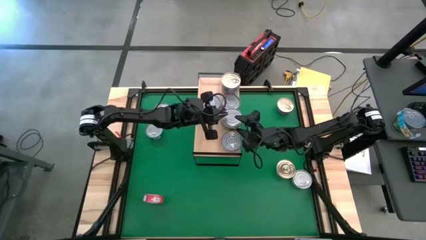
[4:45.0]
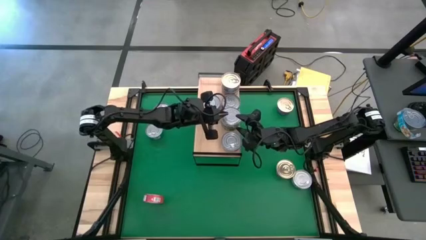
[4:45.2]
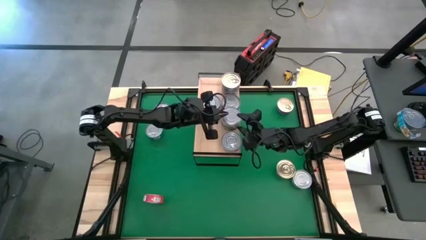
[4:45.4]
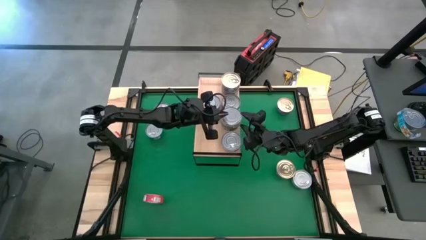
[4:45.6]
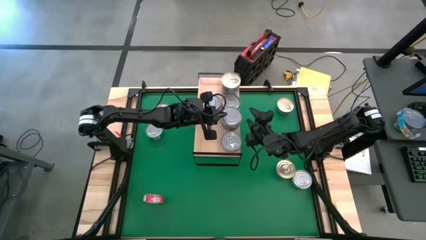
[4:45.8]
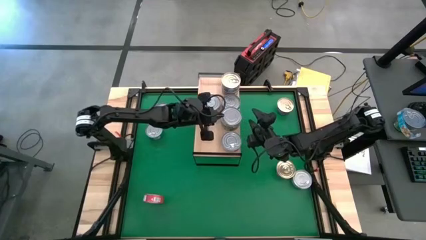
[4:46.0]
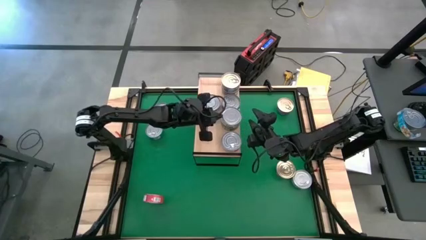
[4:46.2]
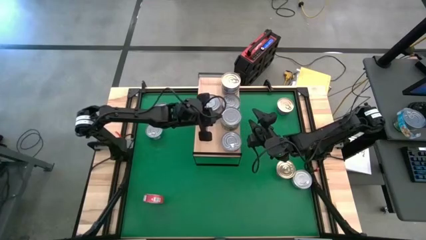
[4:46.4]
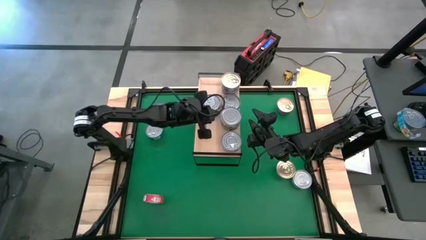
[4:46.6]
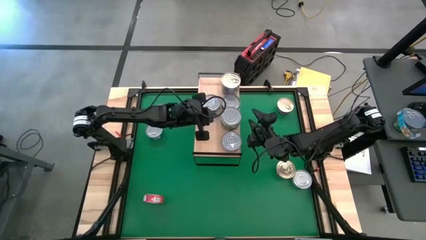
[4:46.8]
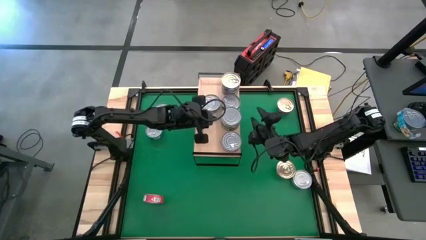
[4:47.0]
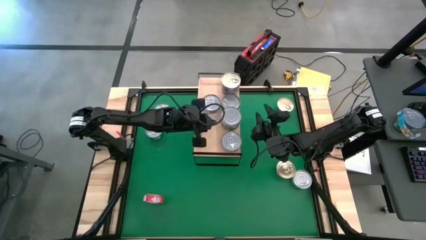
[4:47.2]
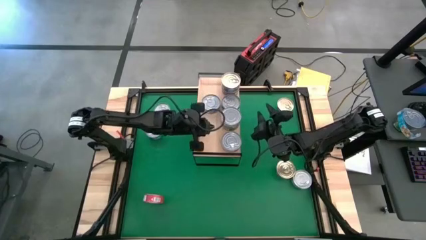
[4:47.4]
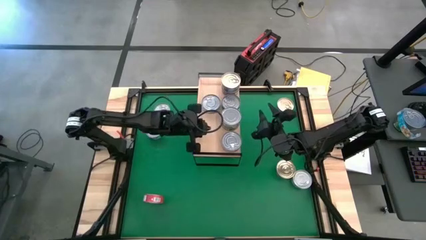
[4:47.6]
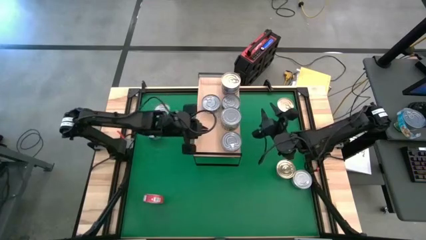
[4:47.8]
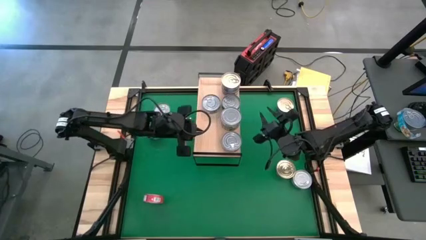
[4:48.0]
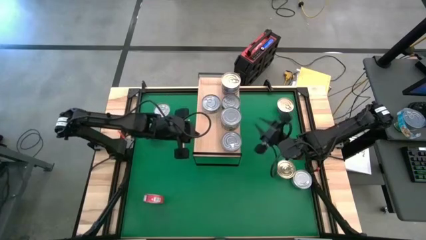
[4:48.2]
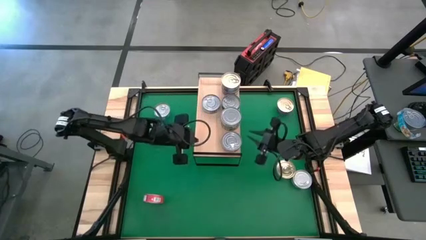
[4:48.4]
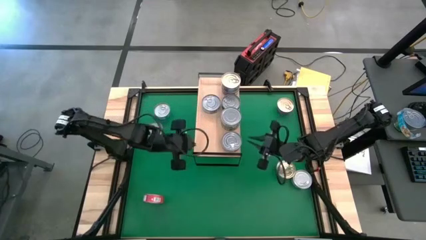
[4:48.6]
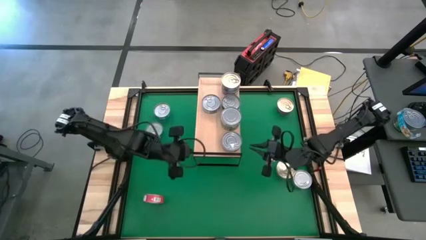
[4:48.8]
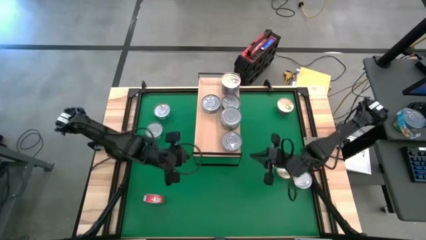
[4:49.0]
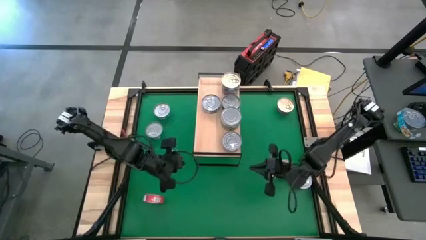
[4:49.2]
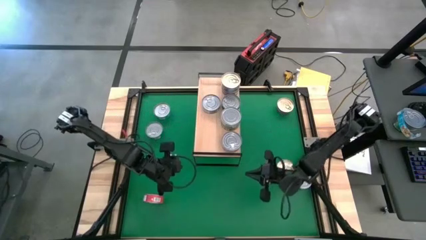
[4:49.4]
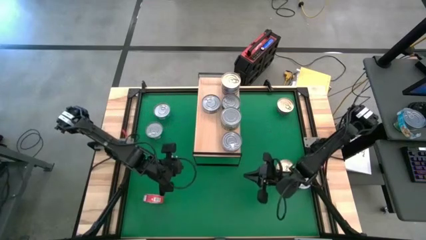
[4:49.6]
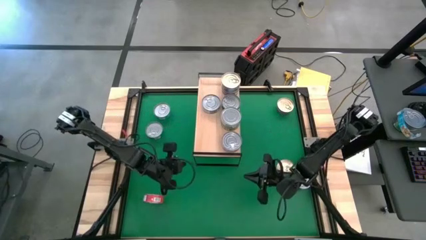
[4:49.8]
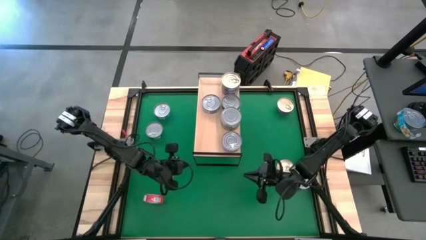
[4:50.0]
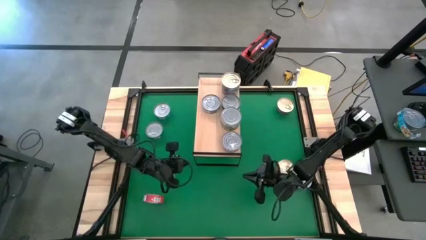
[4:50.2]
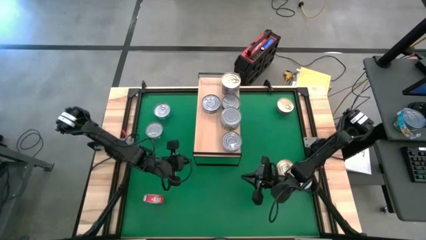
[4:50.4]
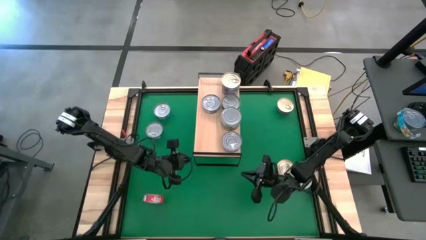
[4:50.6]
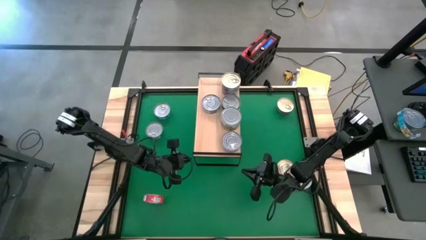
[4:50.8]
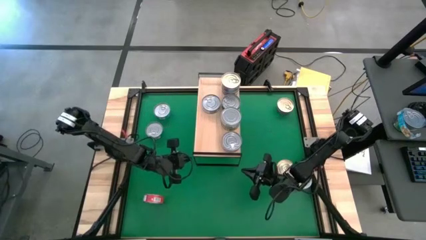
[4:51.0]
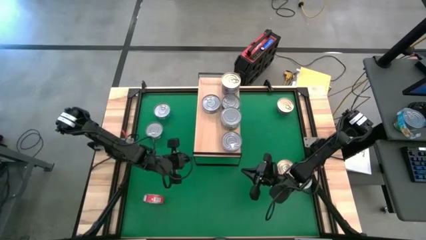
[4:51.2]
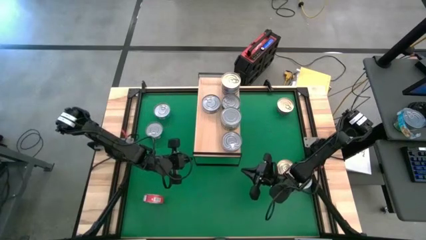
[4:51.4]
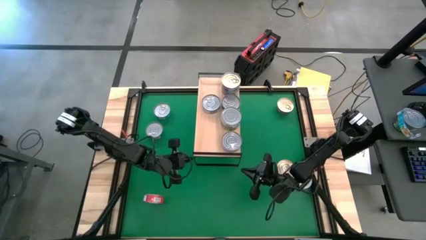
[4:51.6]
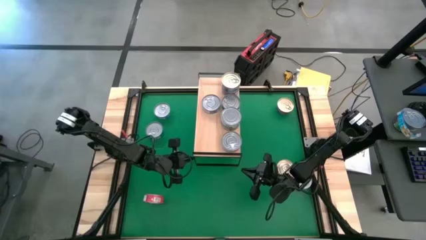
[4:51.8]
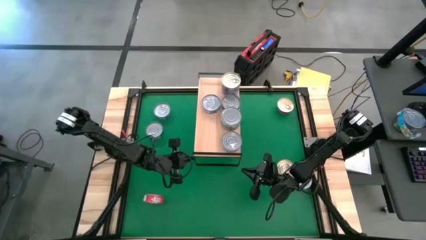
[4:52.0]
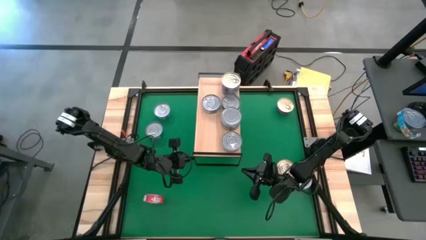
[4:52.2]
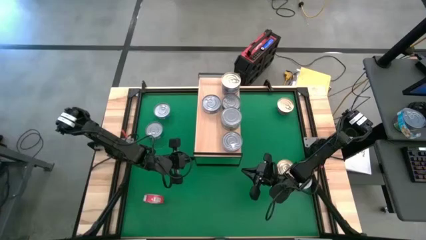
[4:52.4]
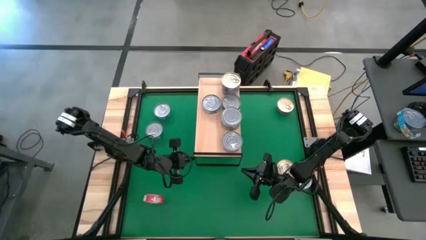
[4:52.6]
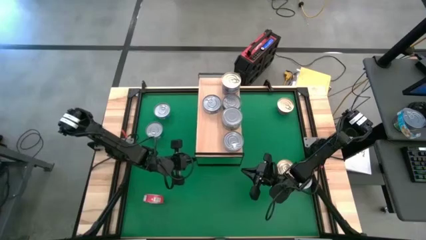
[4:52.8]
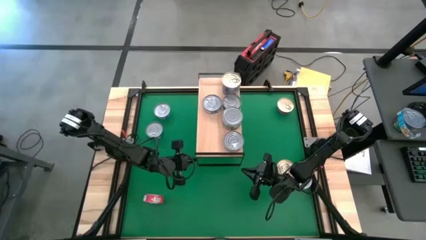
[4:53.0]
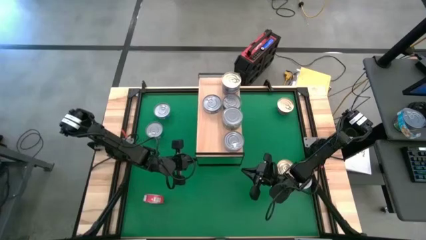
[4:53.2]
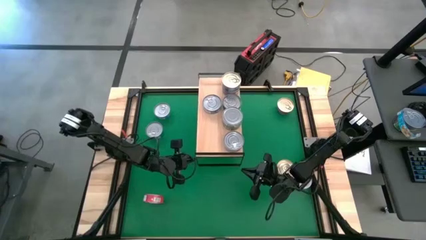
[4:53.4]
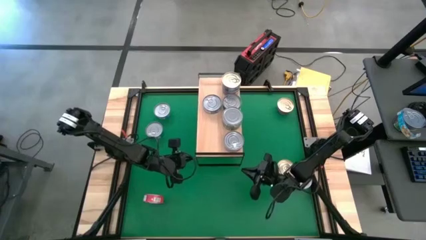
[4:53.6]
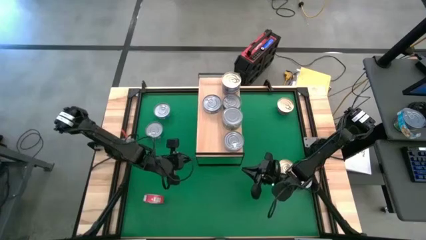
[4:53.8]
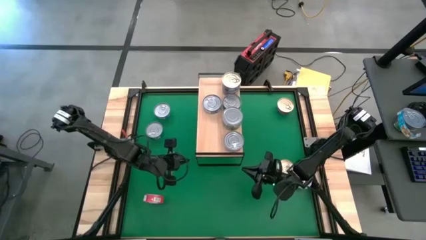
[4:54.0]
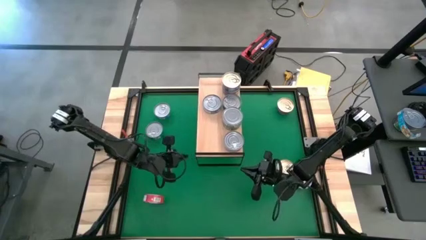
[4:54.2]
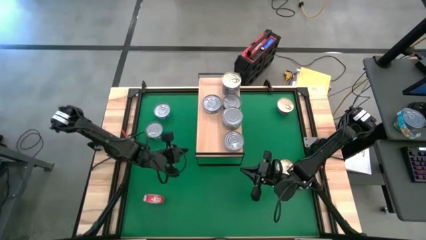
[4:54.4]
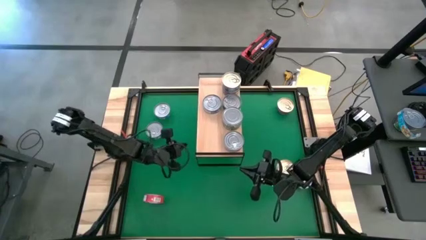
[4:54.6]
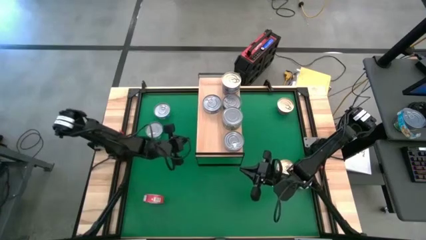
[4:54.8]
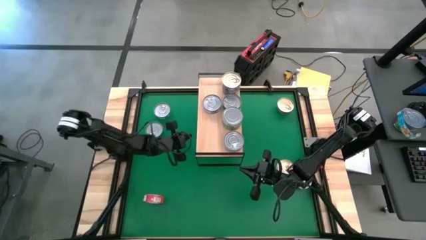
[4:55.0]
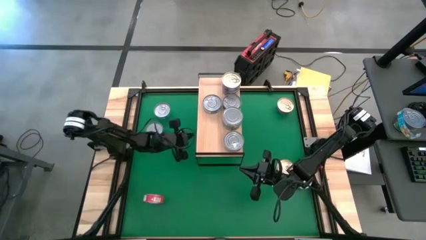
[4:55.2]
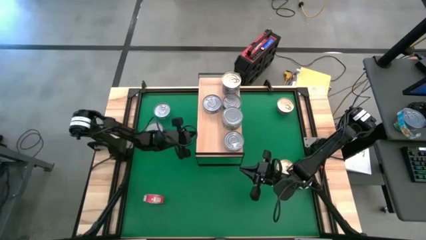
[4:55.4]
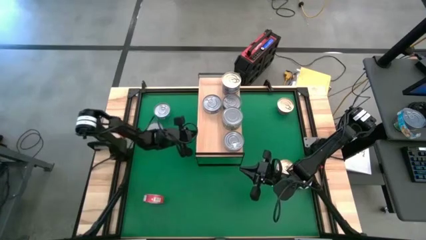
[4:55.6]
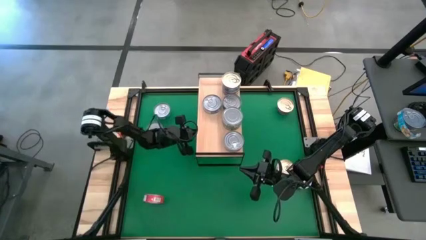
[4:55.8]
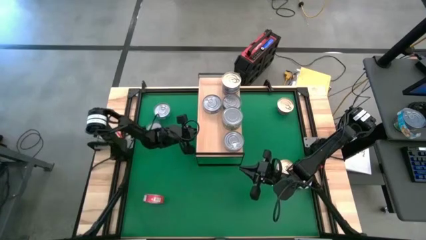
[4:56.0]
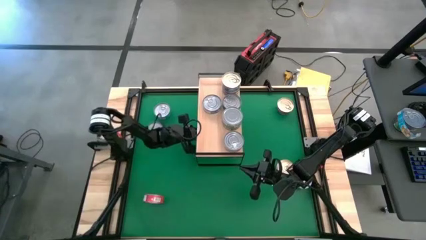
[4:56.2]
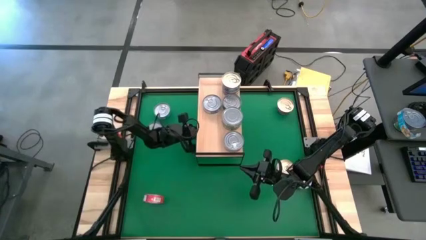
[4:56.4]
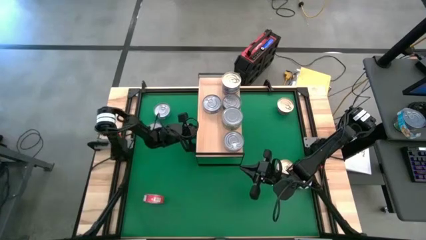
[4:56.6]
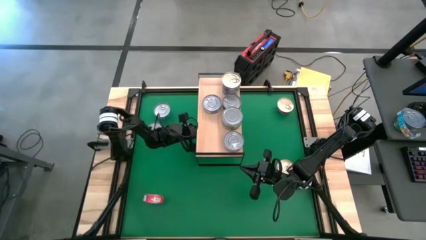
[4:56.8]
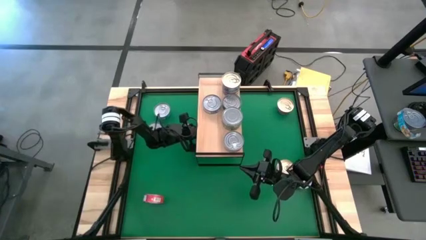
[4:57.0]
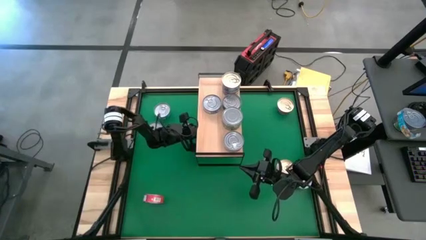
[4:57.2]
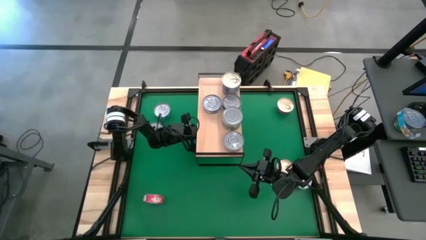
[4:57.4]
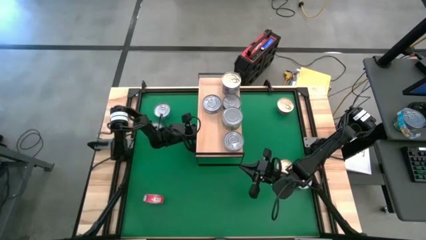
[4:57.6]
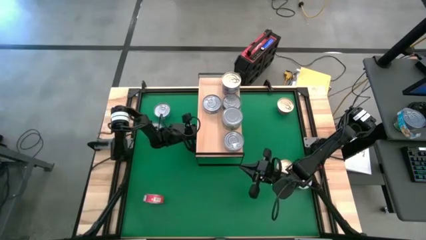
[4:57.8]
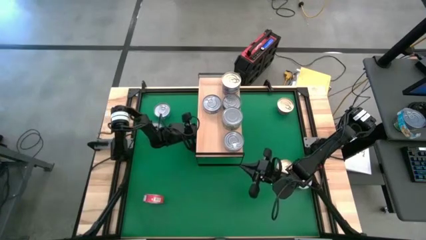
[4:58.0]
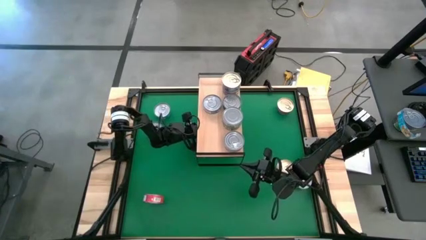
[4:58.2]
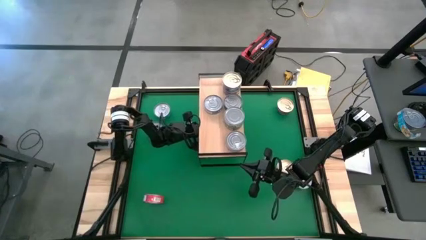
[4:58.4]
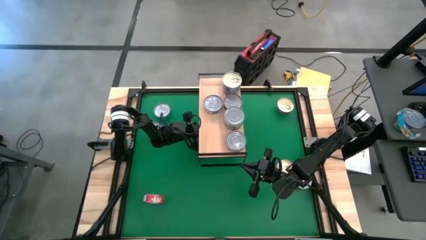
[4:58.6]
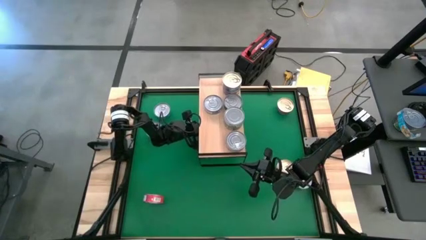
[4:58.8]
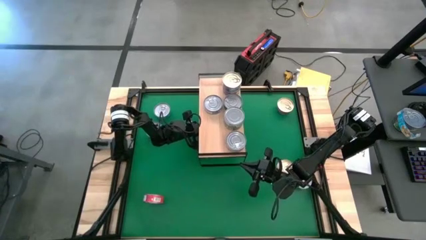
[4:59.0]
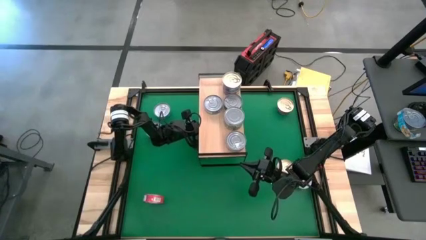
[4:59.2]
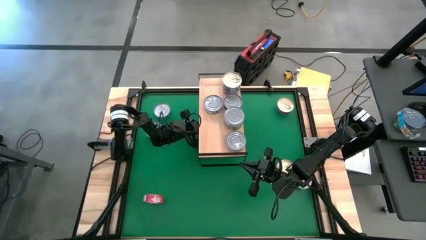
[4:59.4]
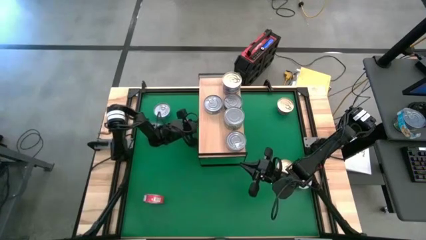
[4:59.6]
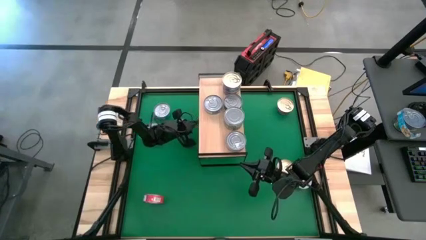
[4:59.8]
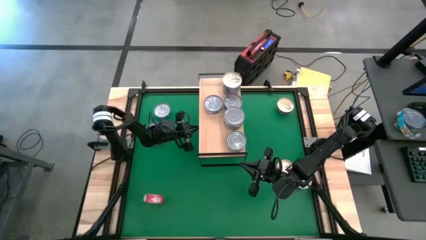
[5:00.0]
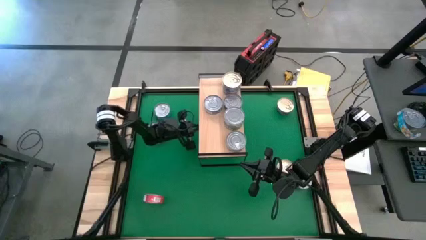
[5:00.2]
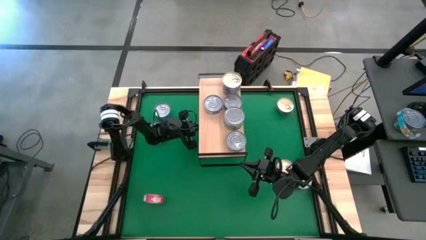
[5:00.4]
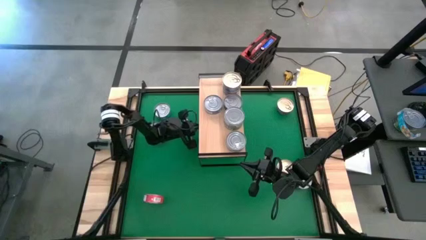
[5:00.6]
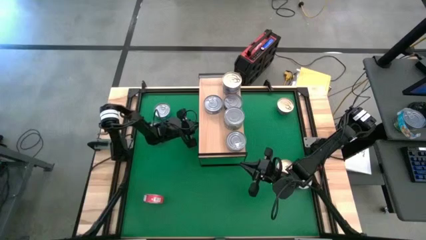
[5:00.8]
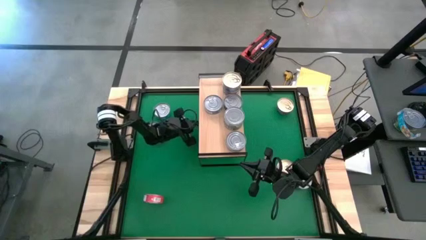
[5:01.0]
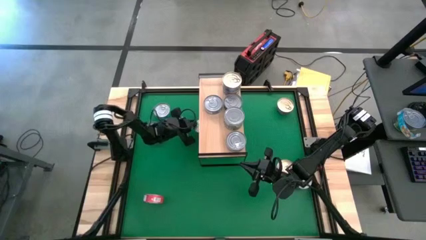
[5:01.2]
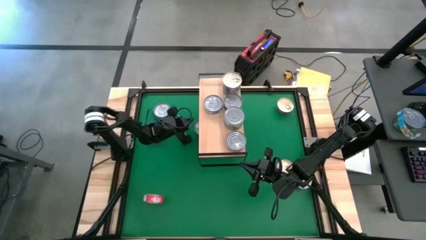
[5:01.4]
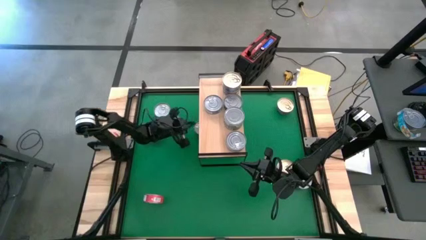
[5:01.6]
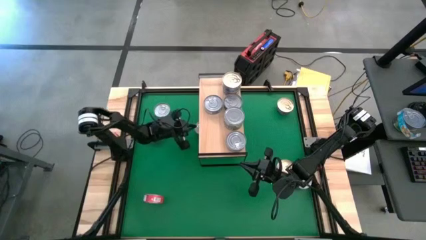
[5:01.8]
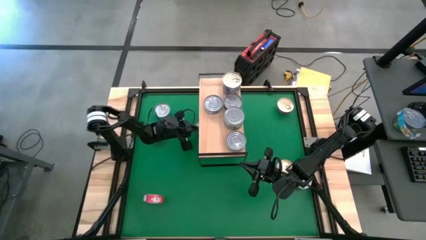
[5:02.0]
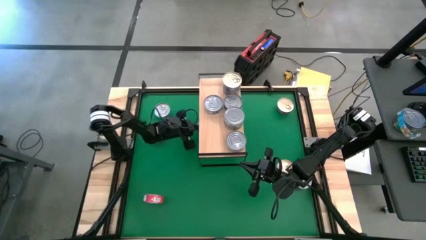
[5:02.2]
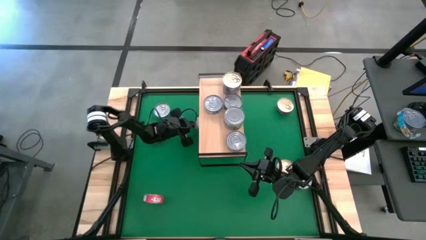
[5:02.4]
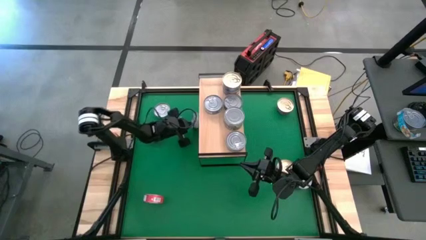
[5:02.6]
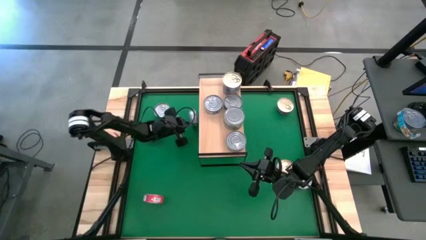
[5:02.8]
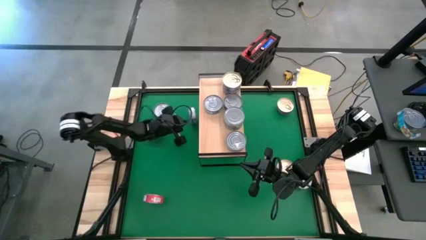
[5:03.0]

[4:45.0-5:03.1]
Task: Stack canned seafood by type on shelf
Stack the blue tuna can on top of the blue tuna can on the shelf
